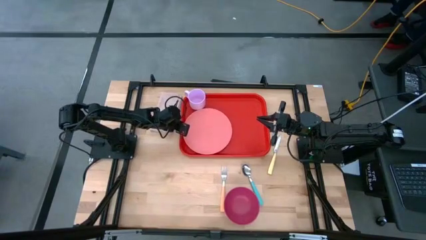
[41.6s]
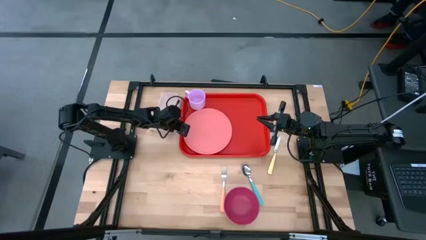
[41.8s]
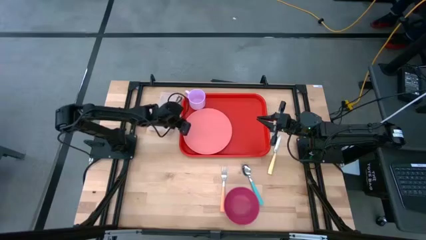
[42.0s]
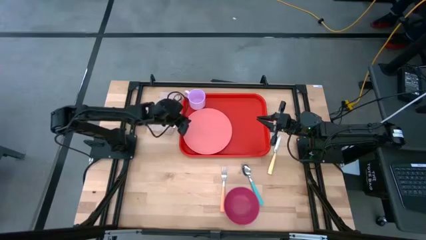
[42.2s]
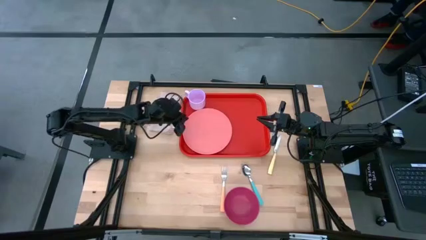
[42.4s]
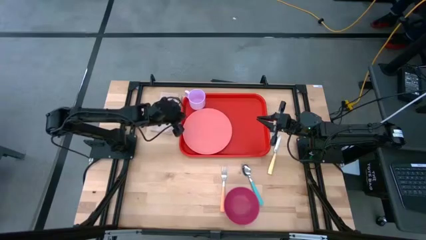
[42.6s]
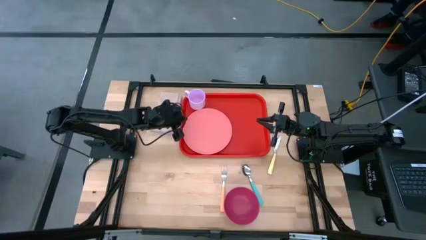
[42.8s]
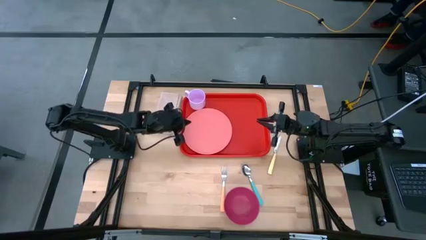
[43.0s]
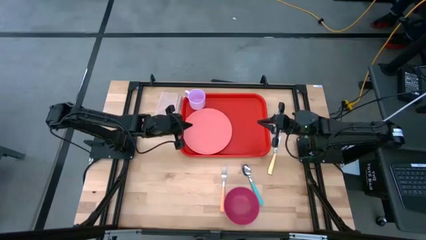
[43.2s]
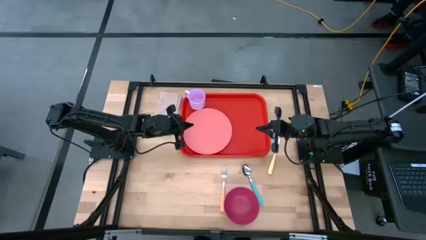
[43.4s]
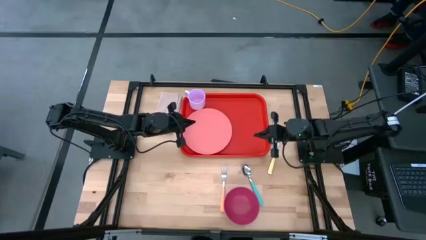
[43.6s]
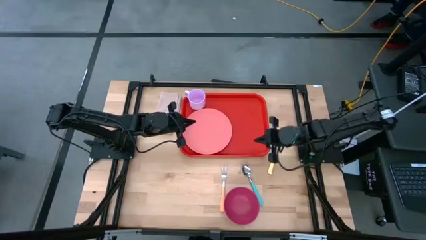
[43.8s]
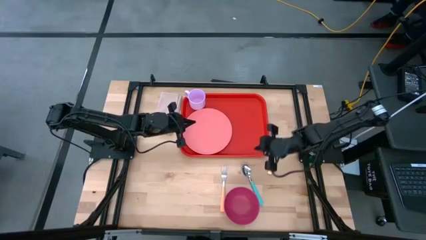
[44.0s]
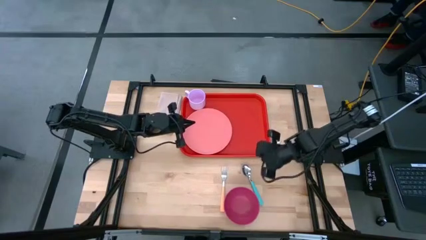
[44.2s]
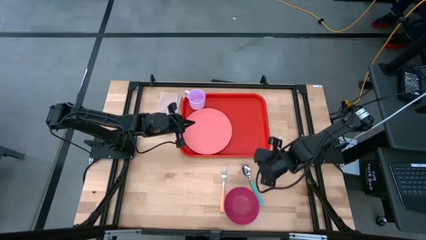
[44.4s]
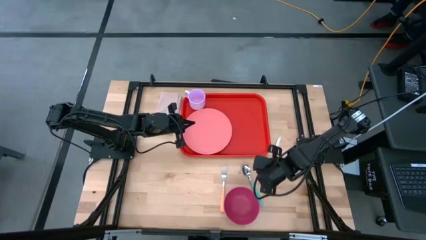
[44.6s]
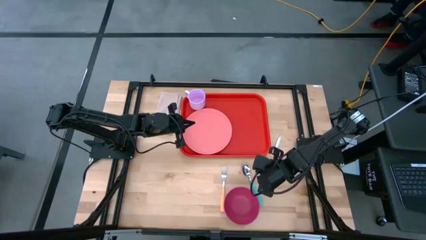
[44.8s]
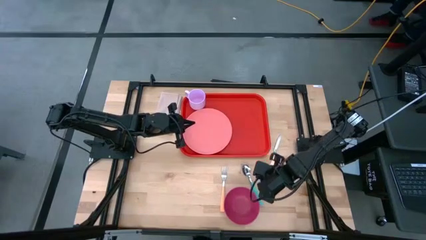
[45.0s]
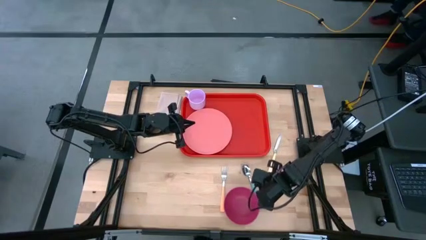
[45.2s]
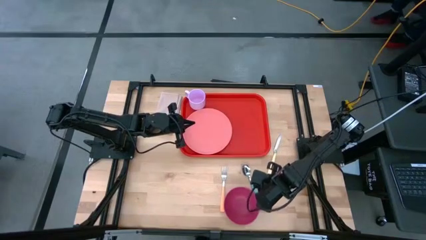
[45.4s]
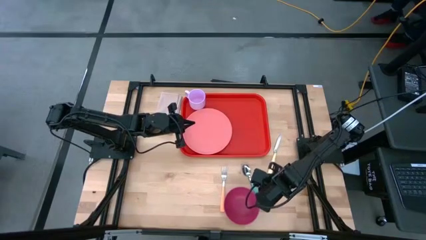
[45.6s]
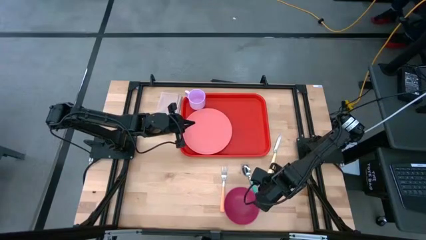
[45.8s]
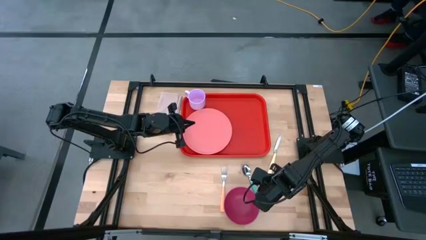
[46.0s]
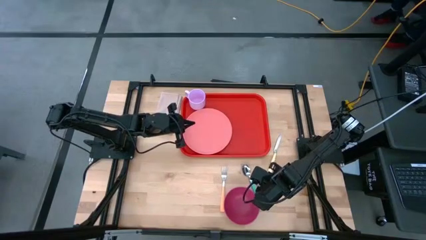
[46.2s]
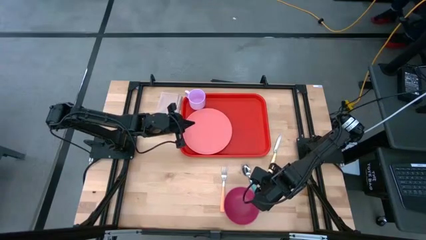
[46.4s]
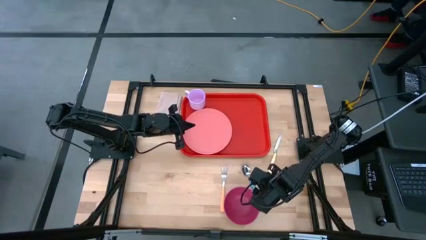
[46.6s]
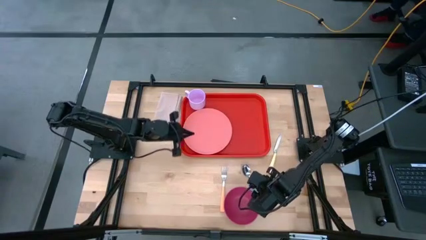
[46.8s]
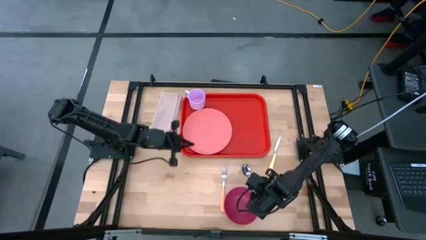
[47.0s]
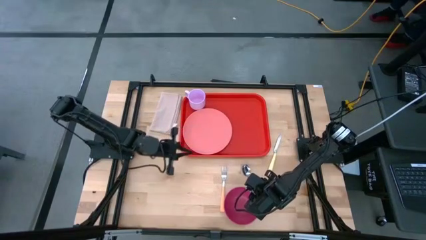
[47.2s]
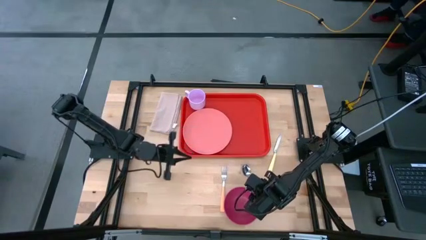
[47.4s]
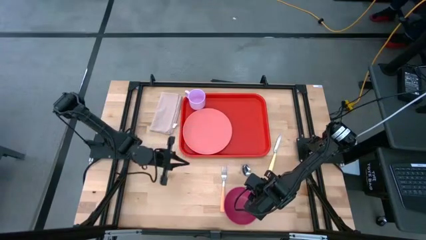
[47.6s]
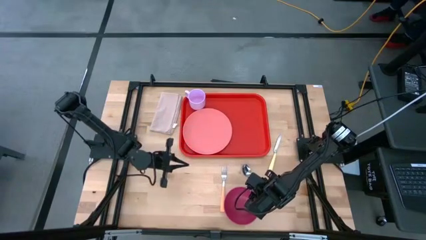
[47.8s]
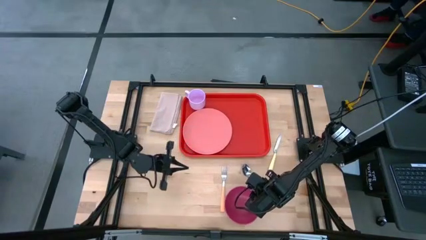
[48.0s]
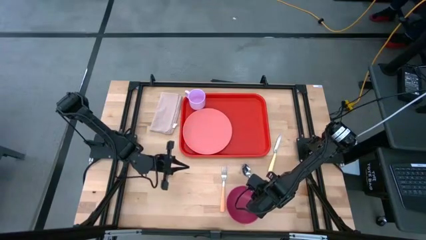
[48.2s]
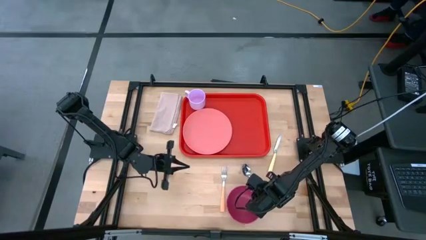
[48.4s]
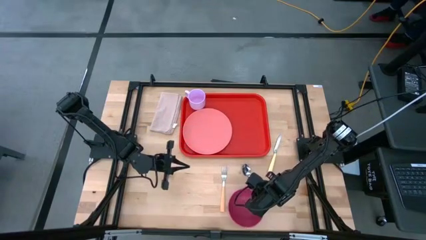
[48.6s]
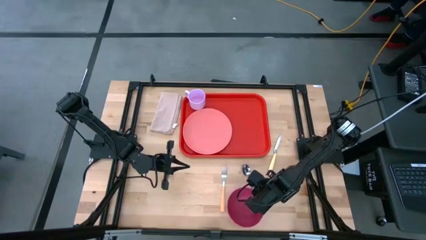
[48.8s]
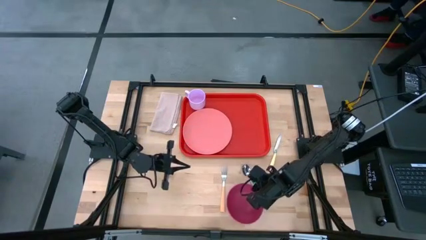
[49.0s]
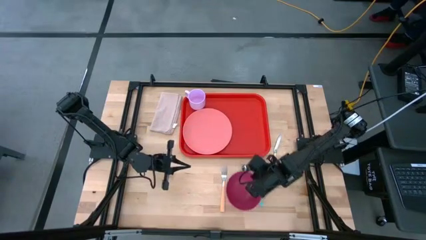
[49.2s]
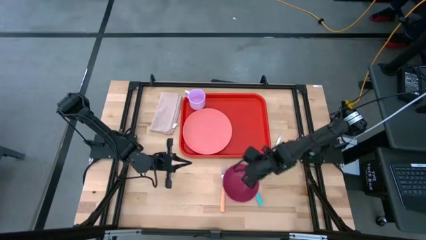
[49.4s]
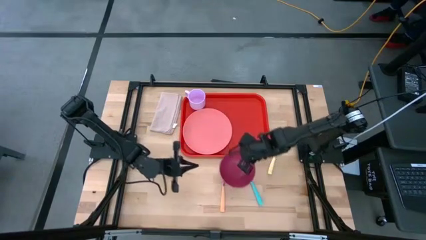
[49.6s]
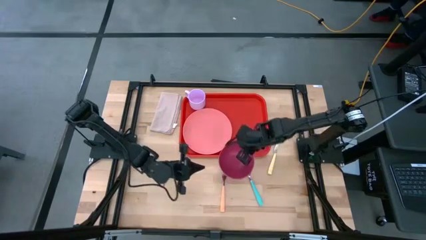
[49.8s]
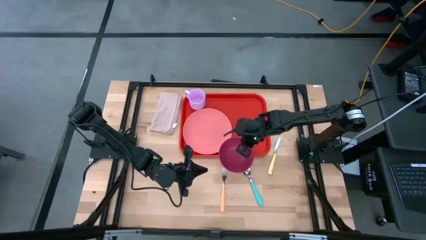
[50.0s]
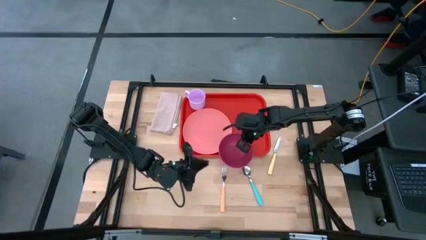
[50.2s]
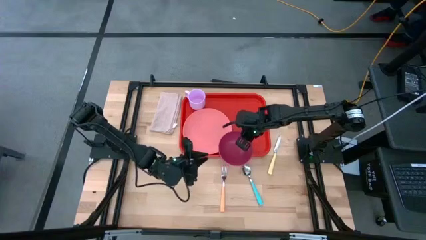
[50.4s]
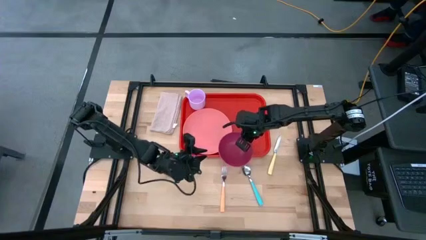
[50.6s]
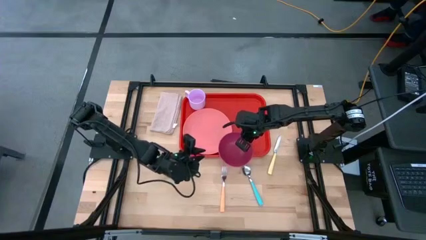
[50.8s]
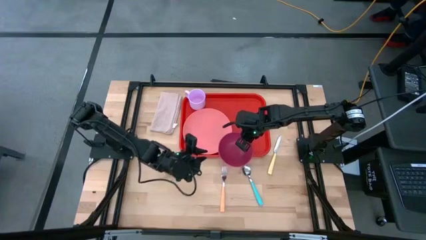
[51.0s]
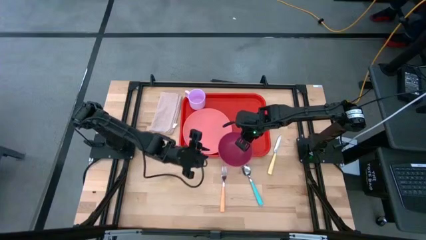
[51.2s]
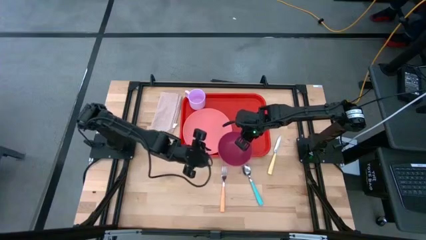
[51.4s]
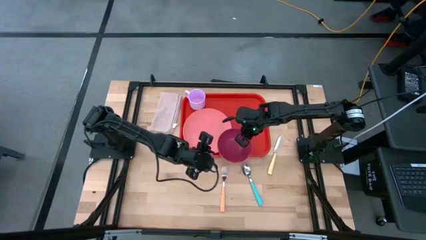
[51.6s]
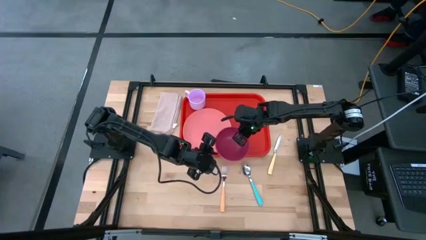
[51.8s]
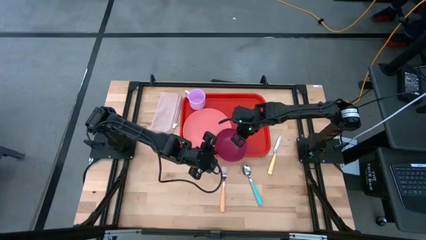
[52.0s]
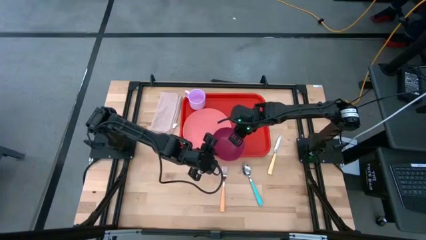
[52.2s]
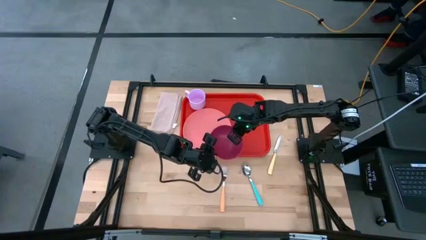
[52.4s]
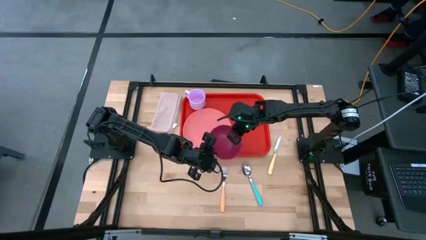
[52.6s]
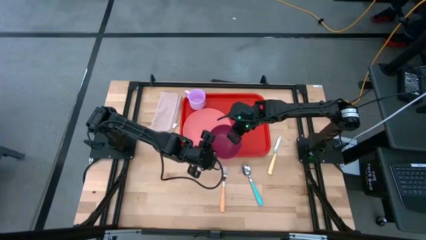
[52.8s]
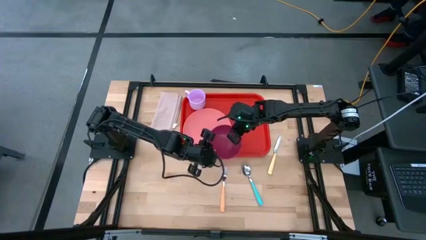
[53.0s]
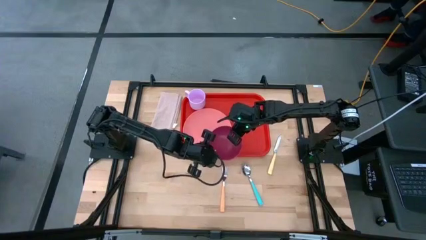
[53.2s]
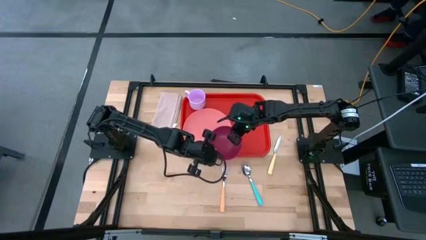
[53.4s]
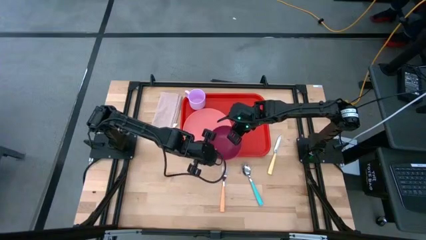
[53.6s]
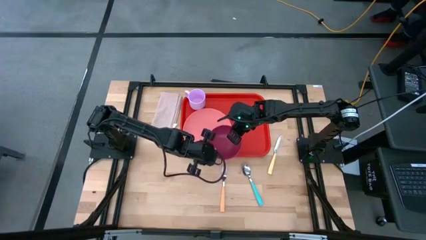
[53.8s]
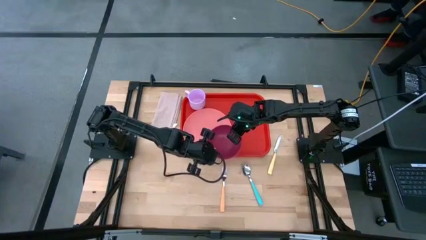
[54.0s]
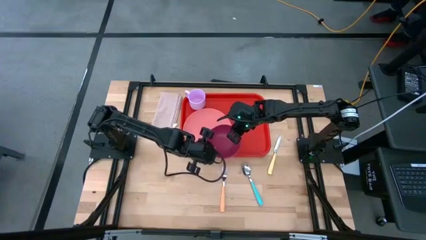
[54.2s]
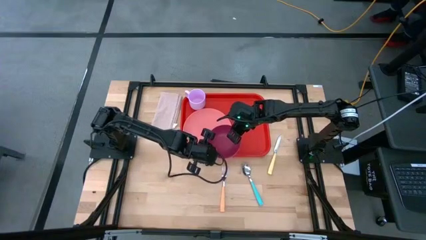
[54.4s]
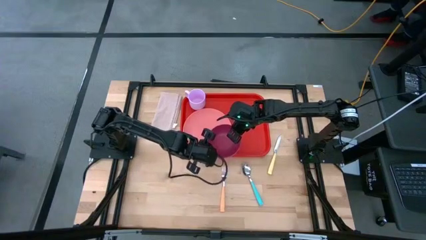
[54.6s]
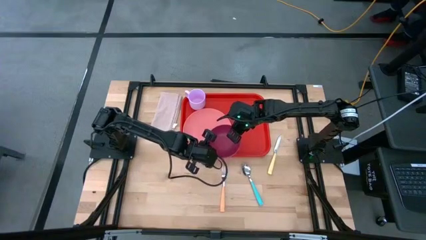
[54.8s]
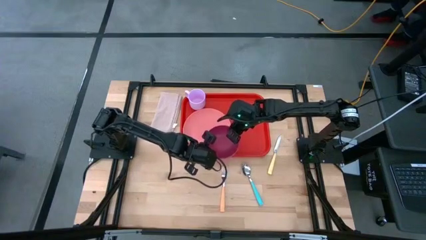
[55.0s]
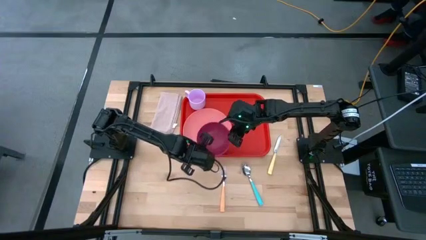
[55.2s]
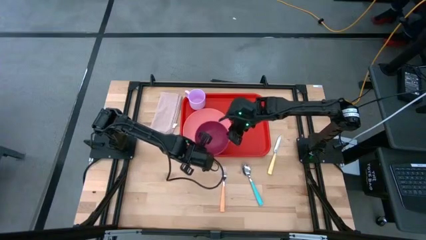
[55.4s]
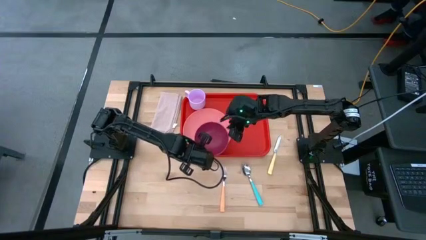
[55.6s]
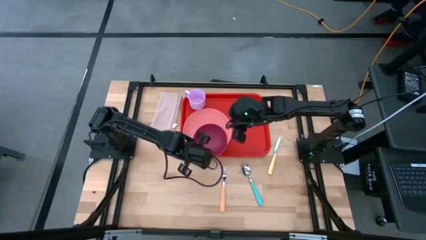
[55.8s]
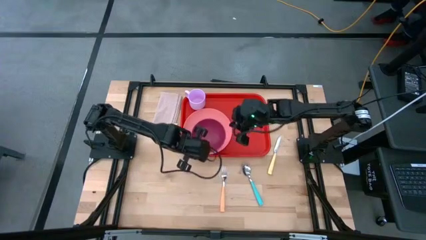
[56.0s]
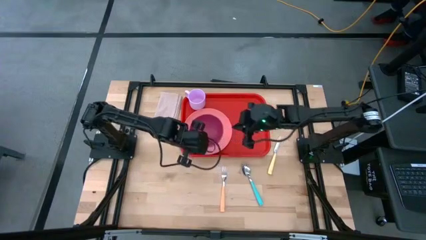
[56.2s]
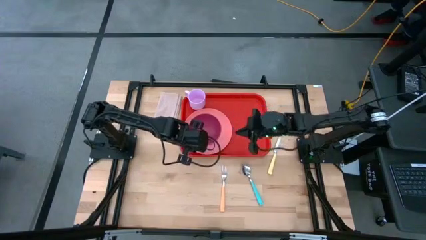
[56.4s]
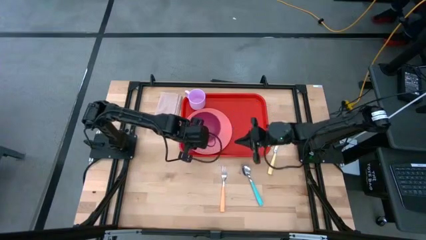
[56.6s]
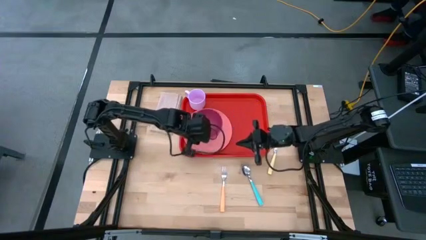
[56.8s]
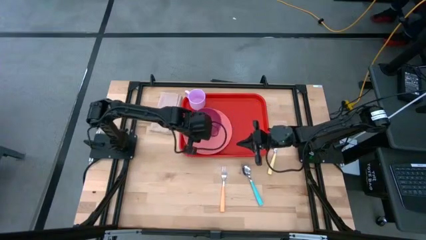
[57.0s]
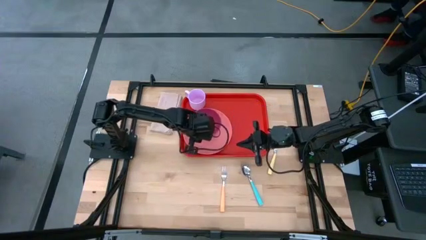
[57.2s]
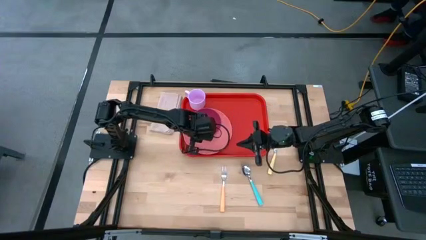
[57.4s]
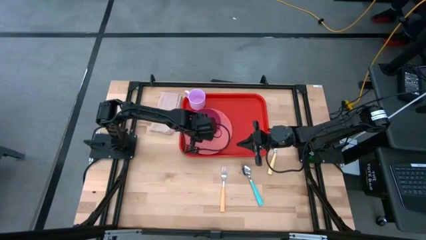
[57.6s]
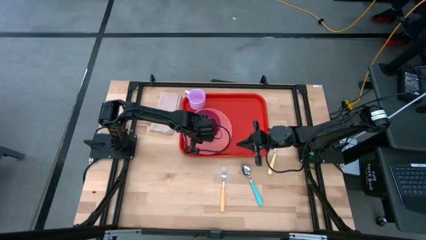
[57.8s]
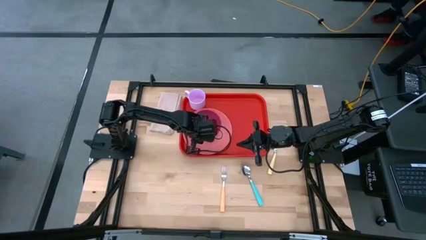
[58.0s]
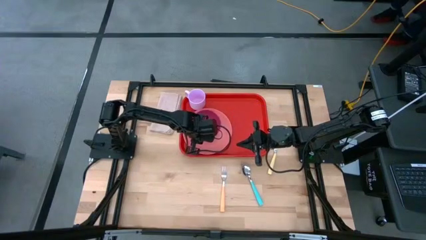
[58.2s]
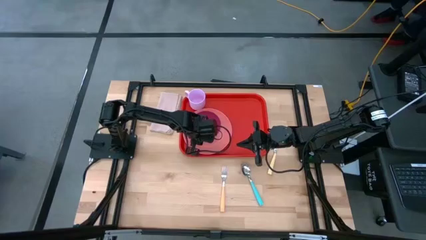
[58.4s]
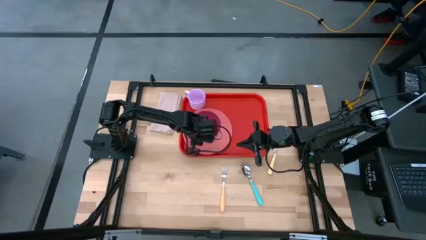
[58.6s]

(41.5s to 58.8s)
Task: Set up tray
Put the pink bowl on the pink plate on the red tray
